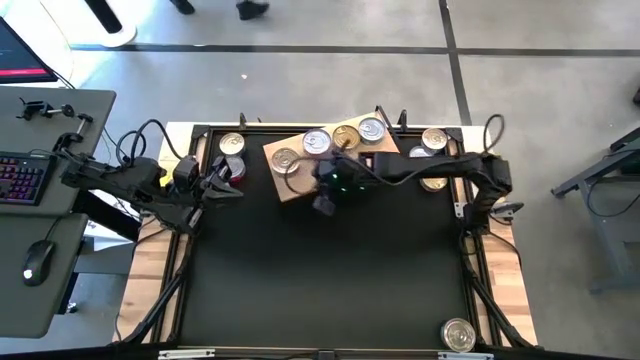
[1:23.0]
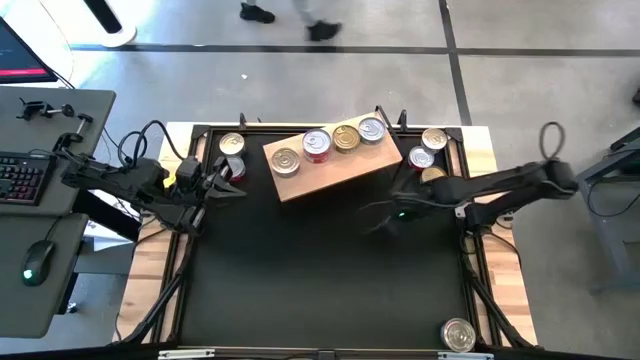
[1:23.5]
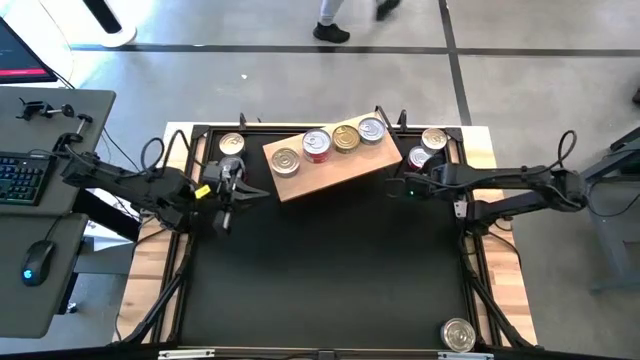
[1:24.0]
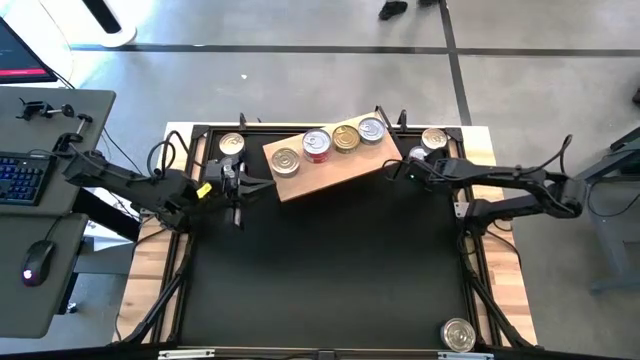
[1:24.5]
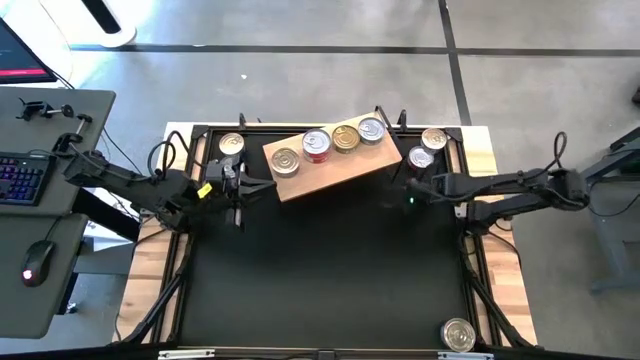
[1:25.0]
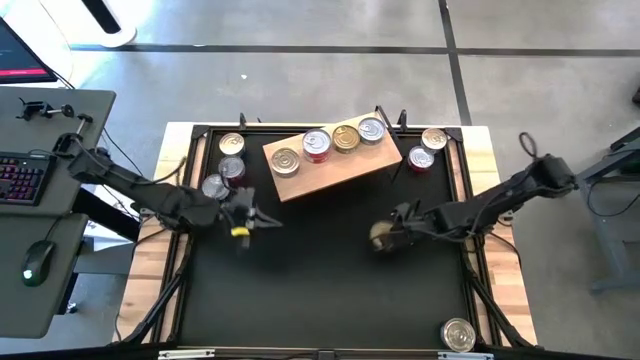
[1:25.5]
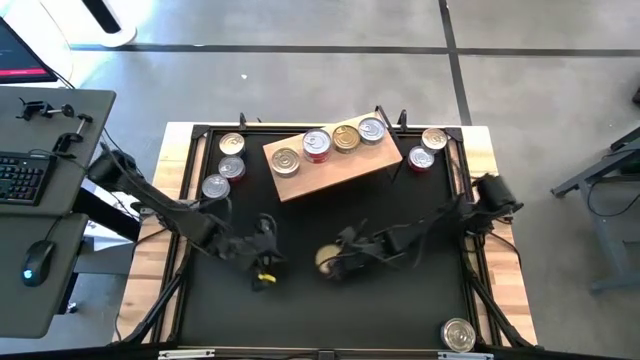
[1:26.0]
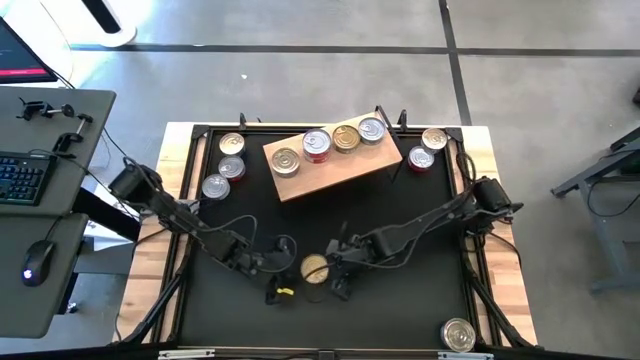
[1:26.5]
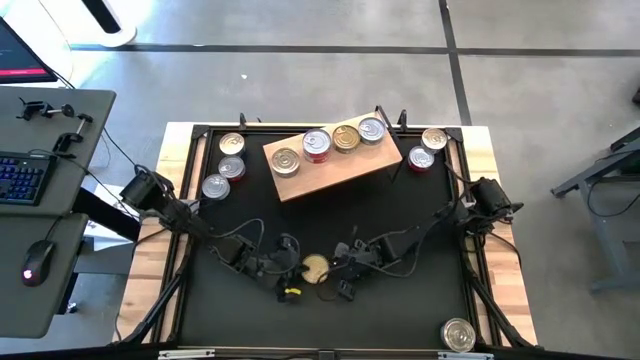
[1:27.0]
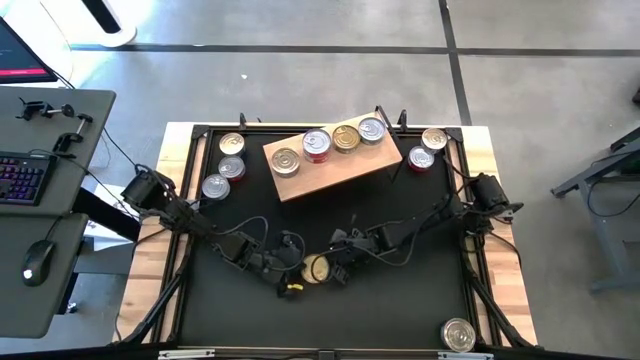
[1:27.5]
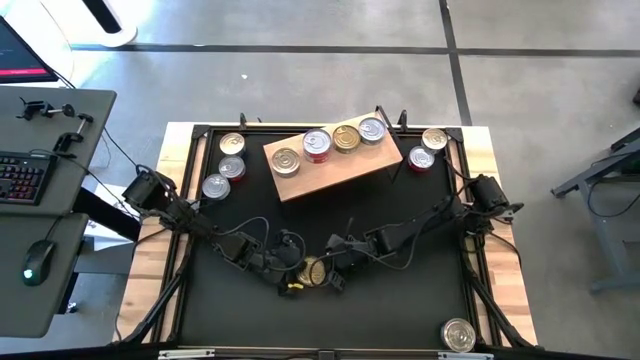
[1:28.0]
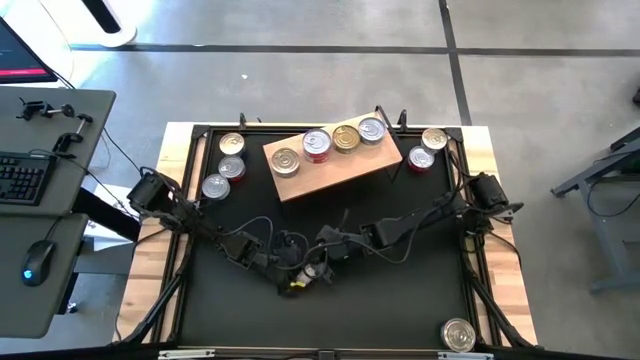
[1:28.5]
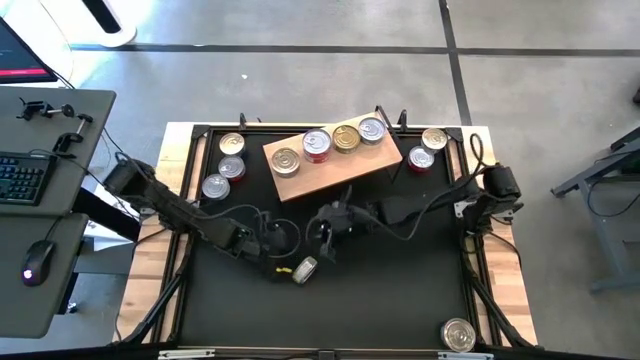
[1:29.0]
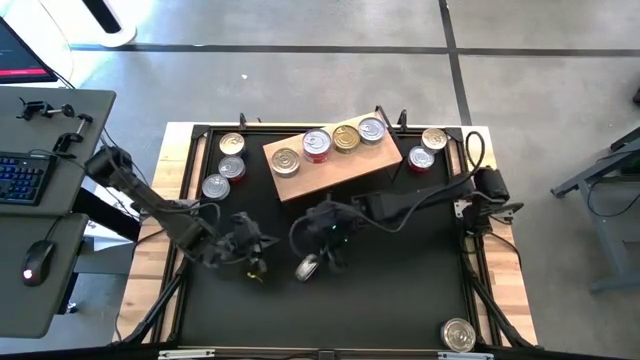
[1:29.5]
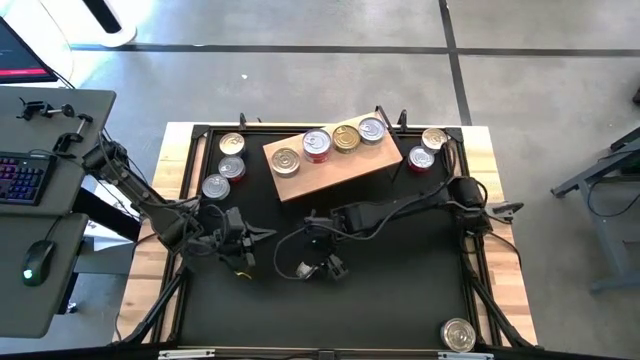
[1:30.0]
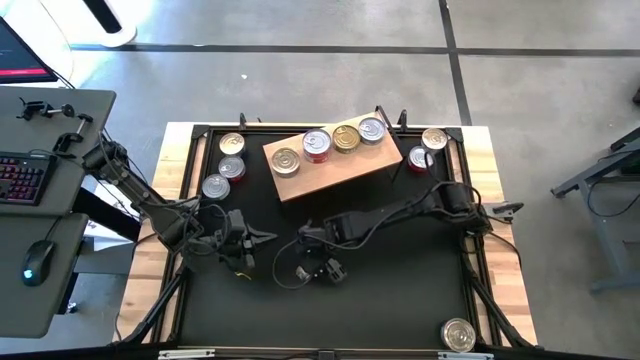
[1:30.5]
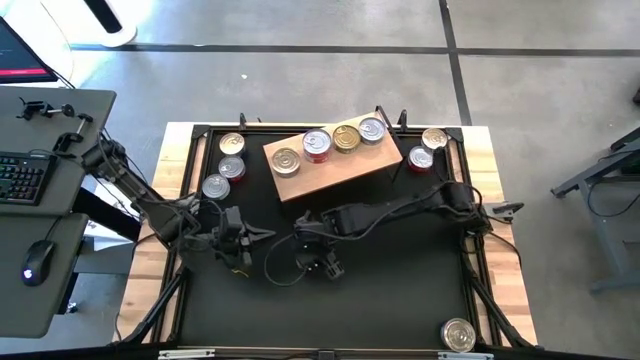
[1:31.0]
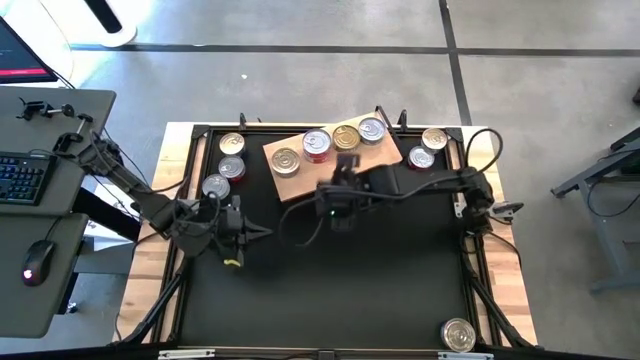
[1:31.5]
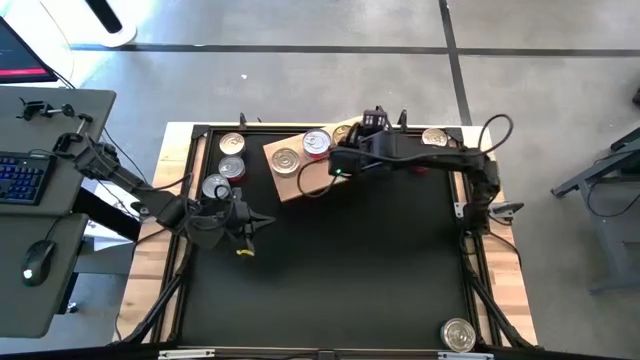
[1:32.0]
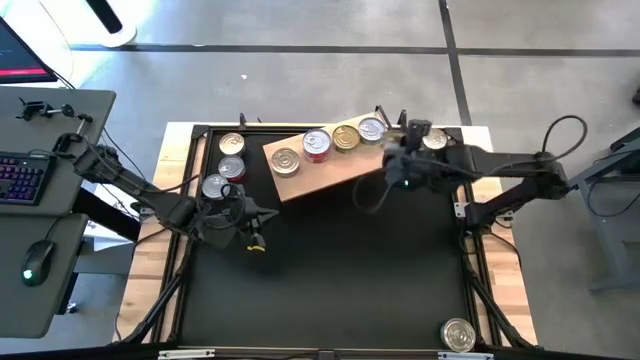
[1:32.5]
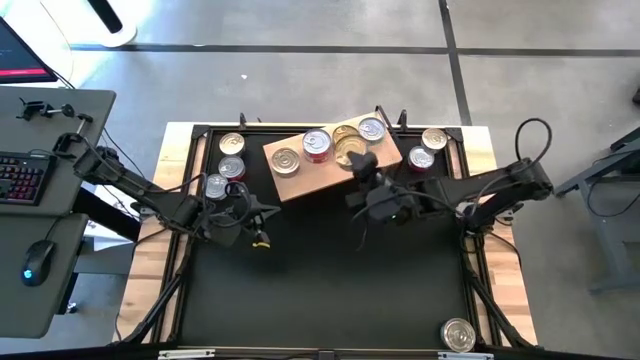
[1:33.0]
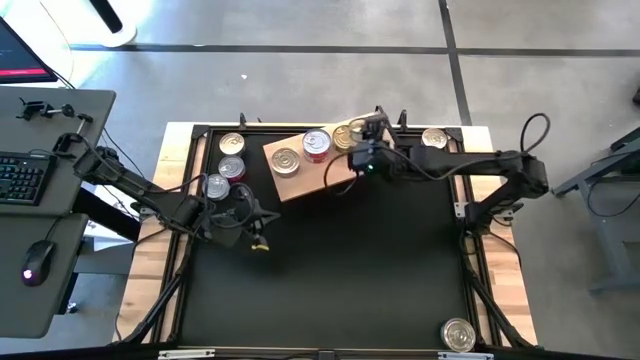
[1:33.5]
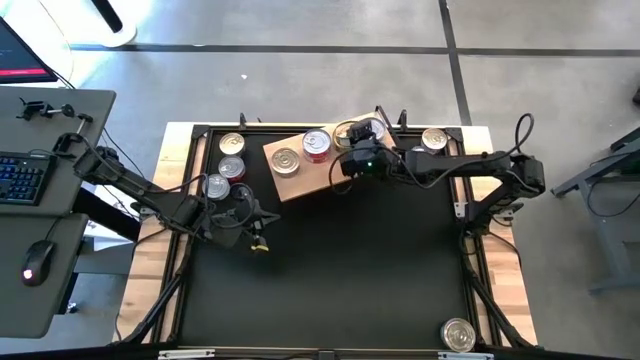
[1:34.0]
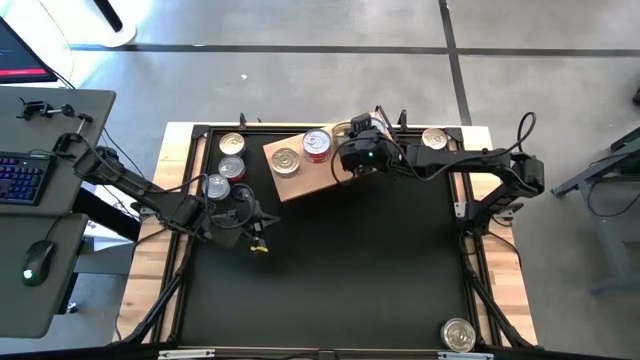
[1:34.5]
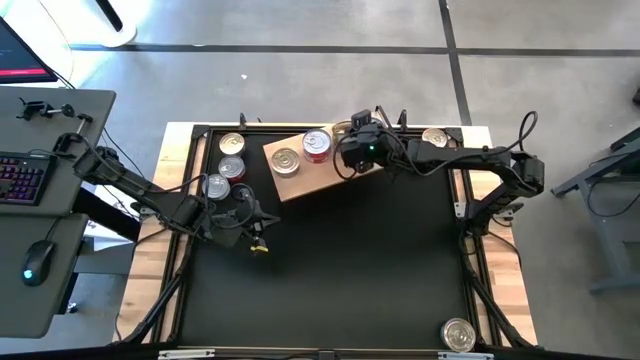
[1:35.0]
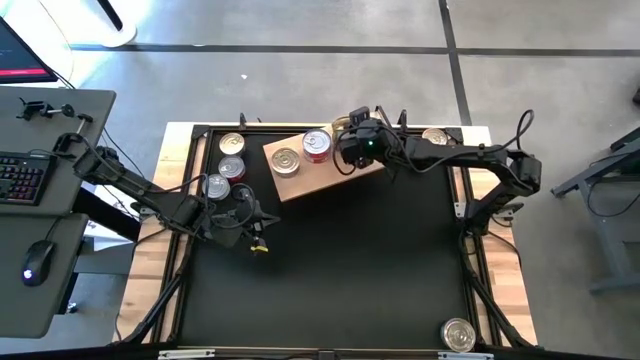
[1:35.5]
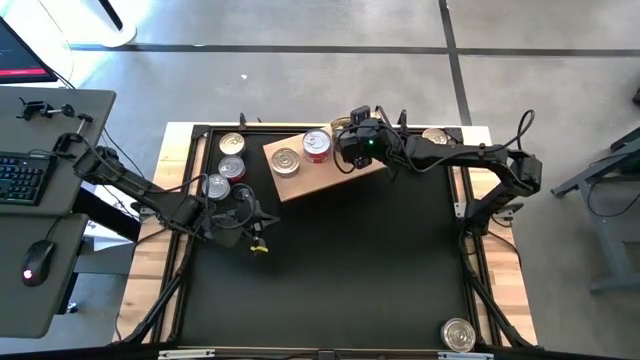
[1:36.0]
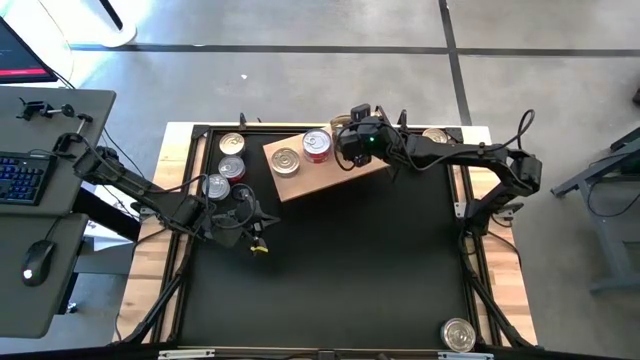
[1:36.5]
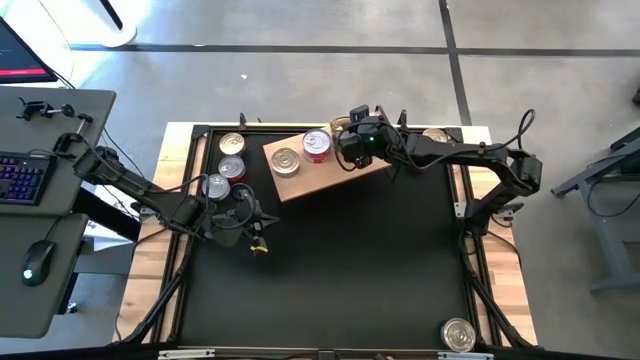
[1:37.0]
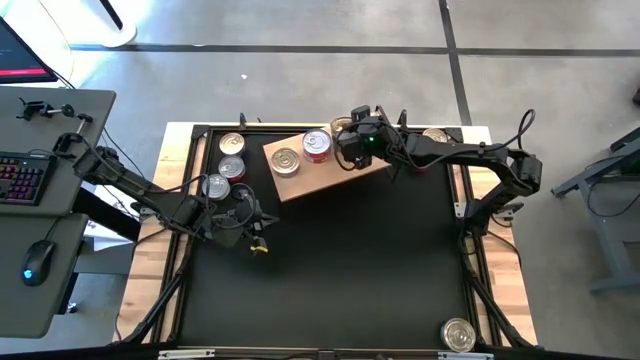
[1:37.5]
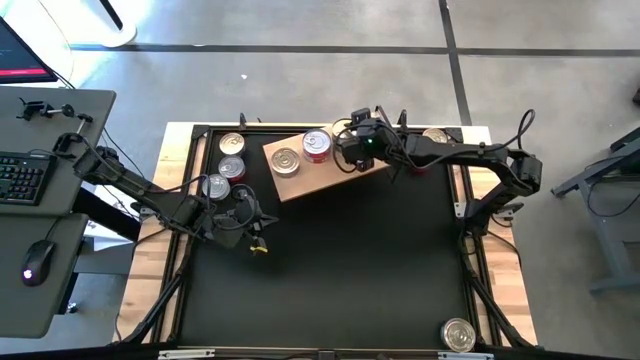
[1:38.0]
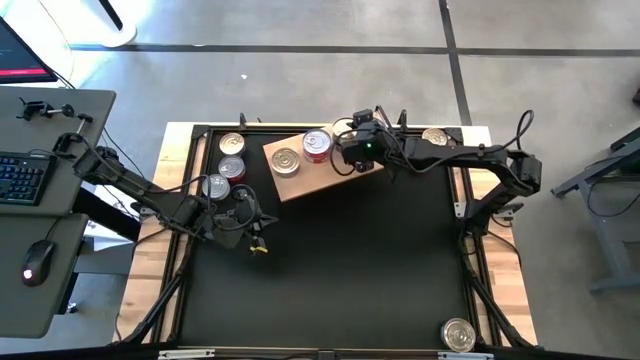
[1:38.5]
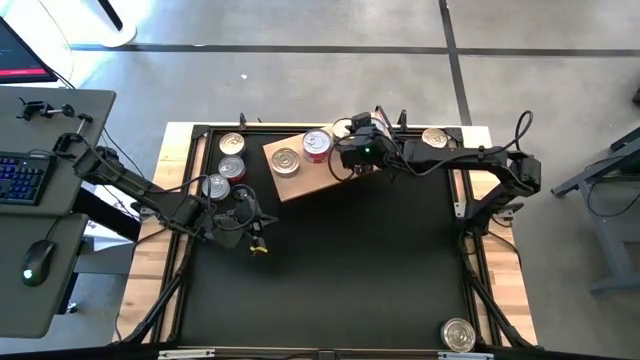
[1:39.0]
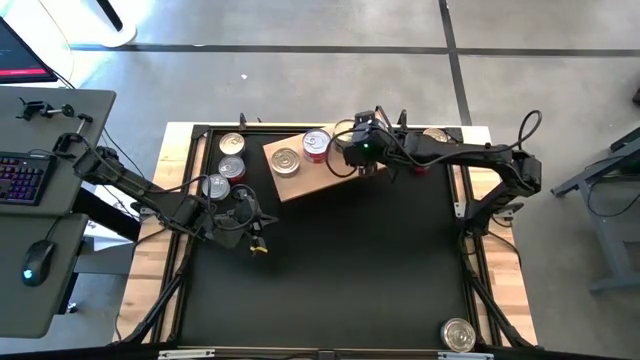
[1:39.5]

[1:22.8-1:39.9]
Task: Stack canned seafood by type on shelf
Stack the gold and green tuna can on top of the gold and green tuna can on the shelf

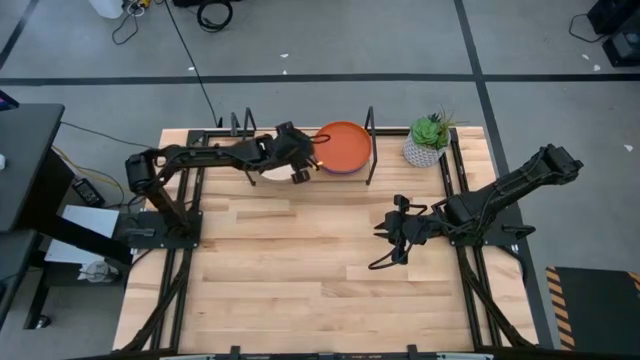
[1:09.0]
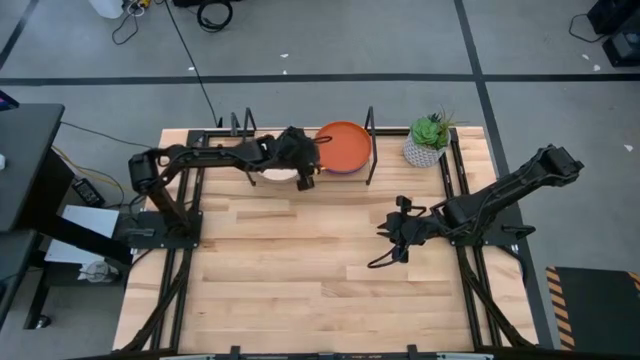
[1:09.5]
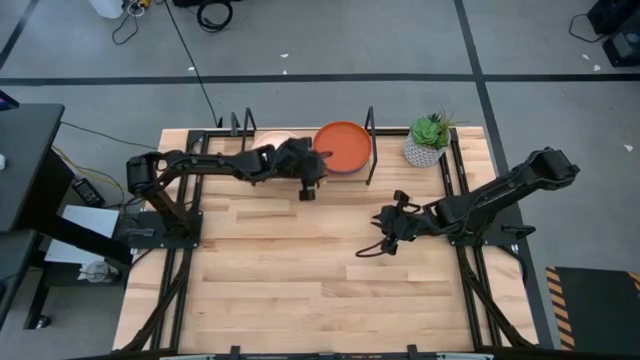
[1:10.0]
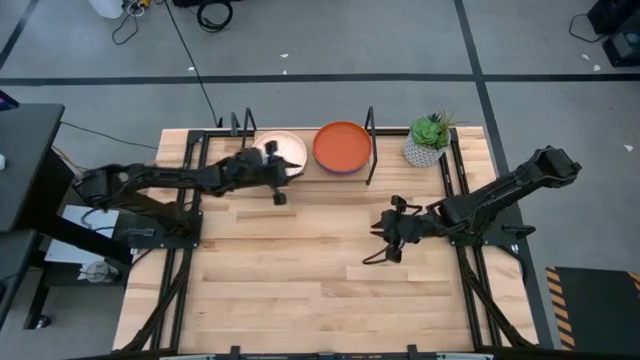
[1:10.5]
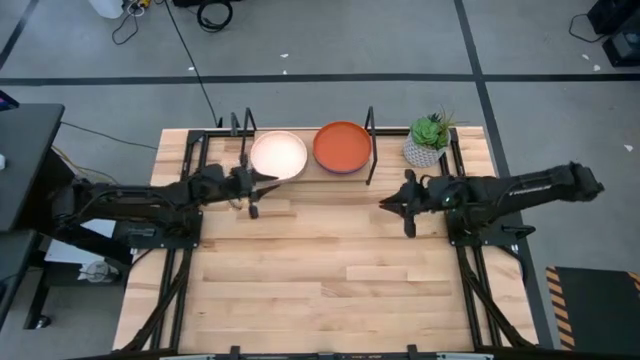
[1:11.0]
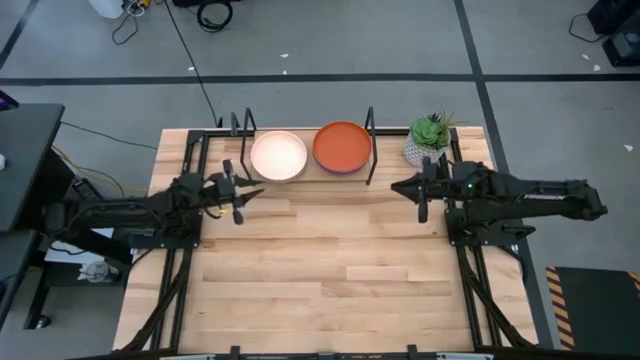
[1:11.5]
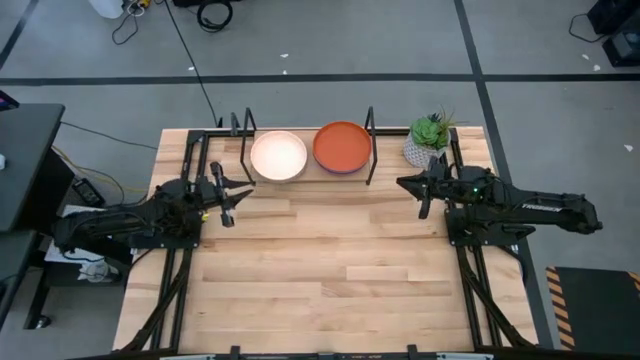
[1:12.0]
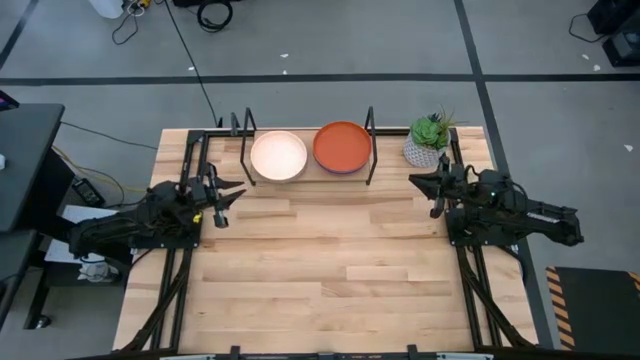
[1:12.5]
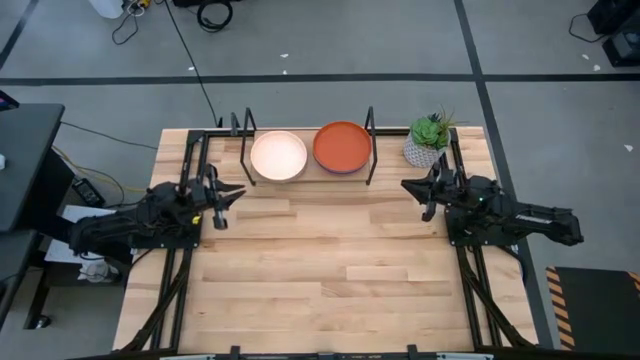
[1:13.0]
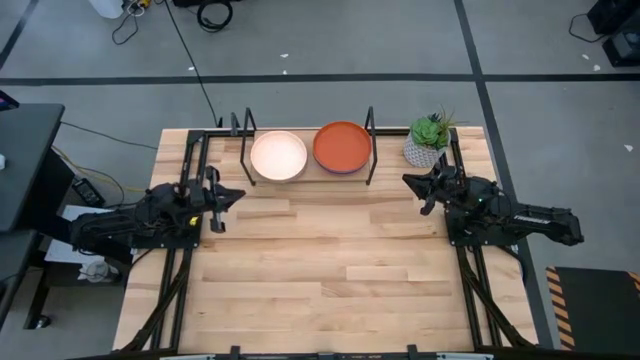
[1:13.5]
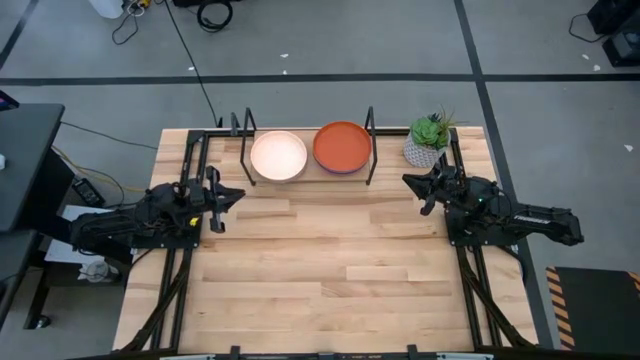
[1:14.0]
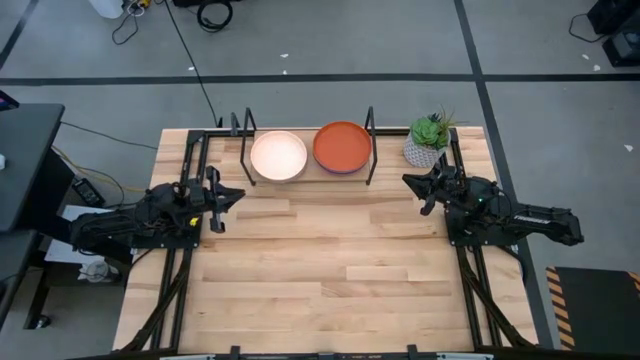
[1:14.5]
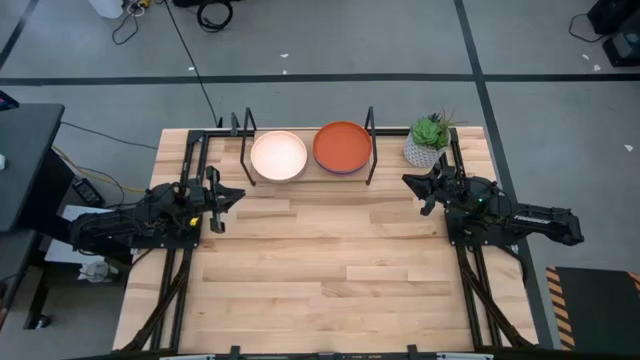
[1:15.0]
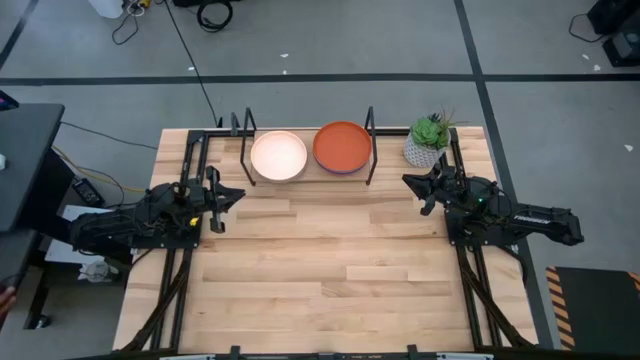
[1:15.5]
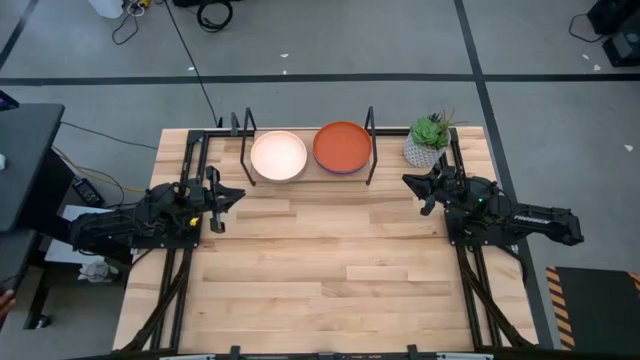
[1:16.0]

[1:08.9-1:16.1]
Task: Place and stack plates onto a shelf
Return to Home Position
